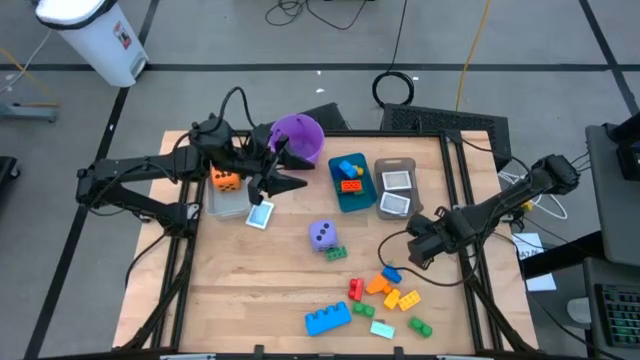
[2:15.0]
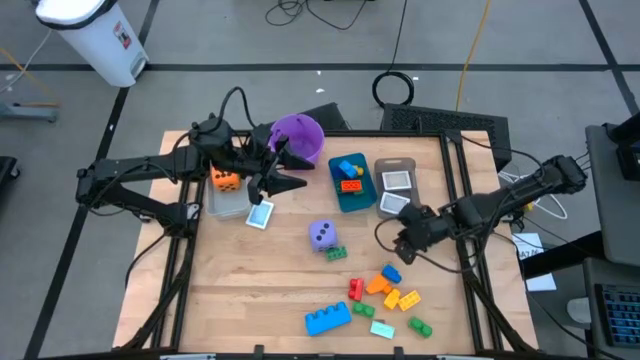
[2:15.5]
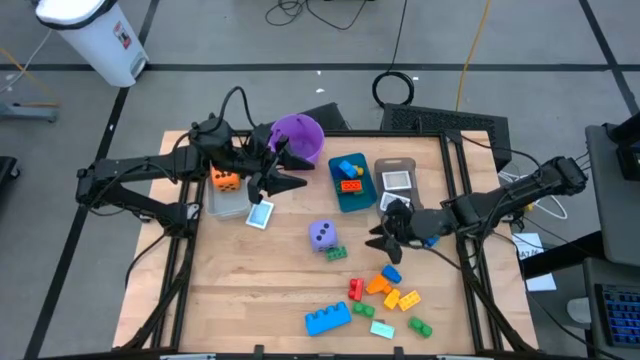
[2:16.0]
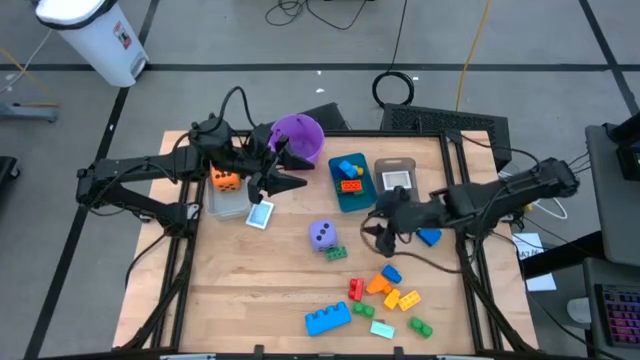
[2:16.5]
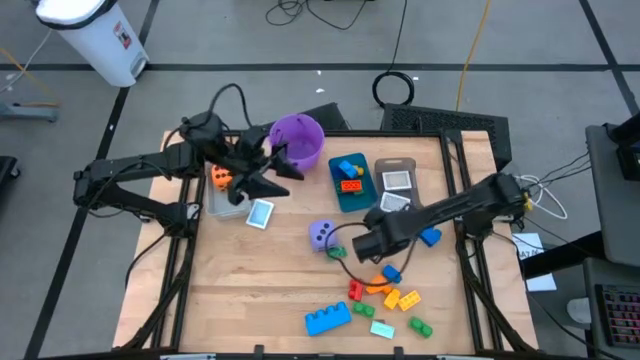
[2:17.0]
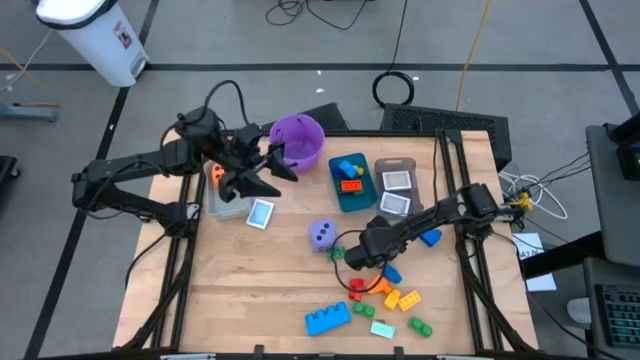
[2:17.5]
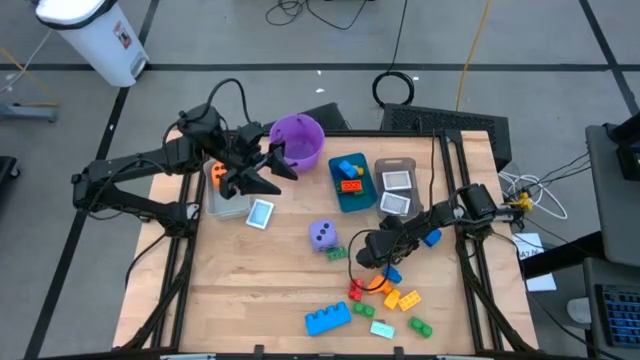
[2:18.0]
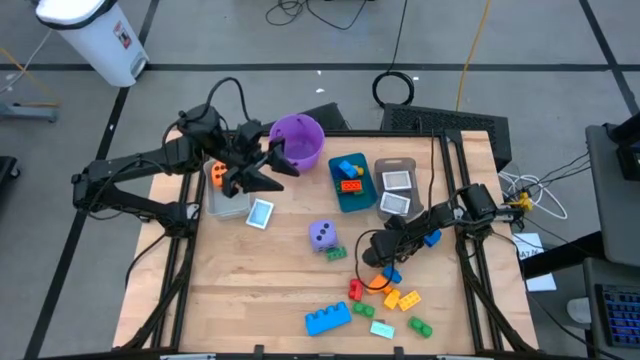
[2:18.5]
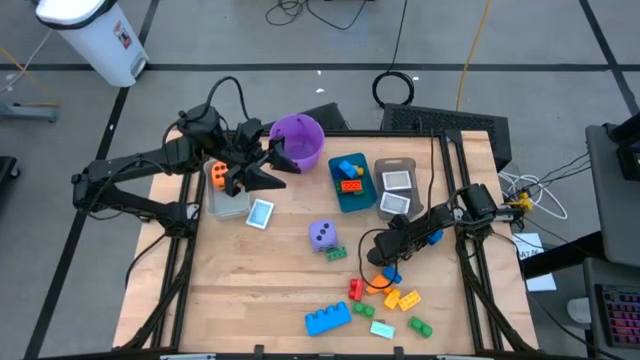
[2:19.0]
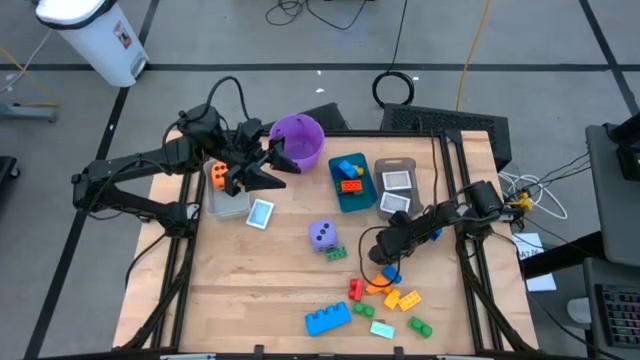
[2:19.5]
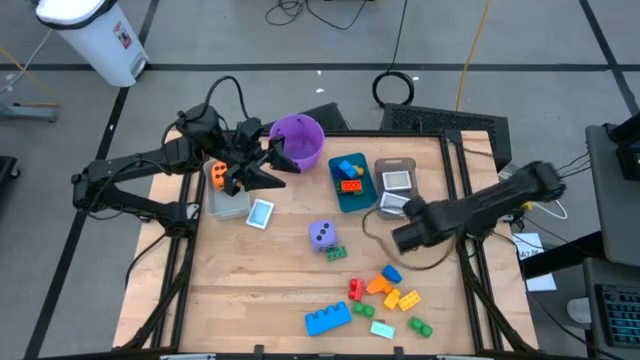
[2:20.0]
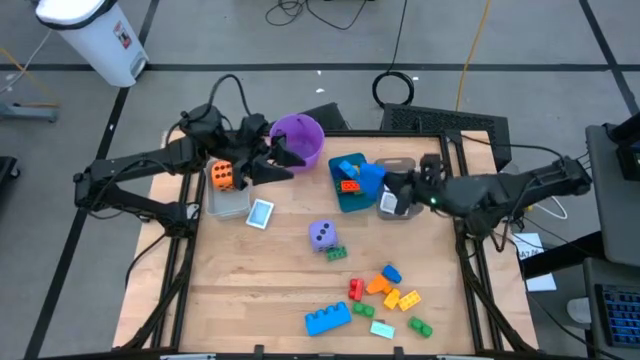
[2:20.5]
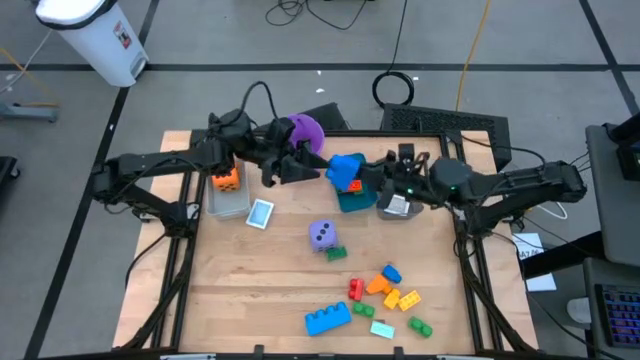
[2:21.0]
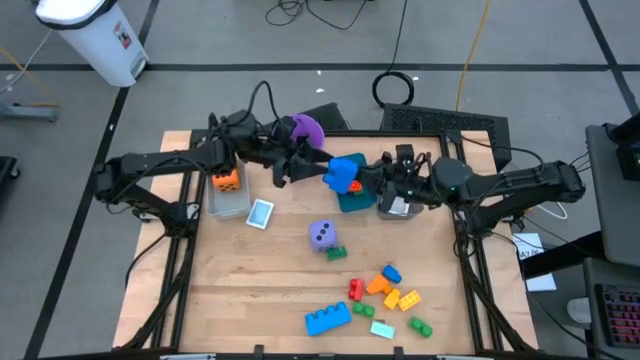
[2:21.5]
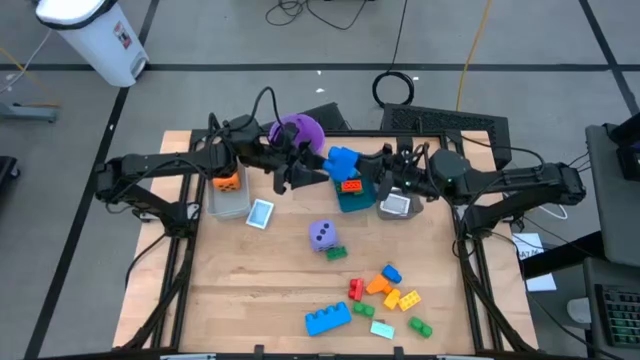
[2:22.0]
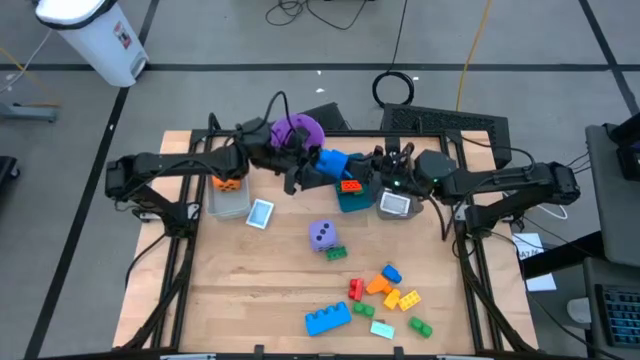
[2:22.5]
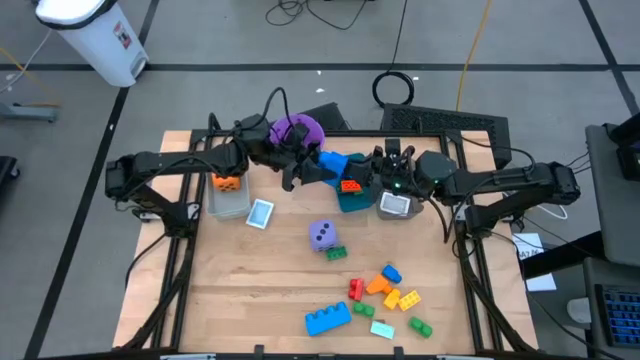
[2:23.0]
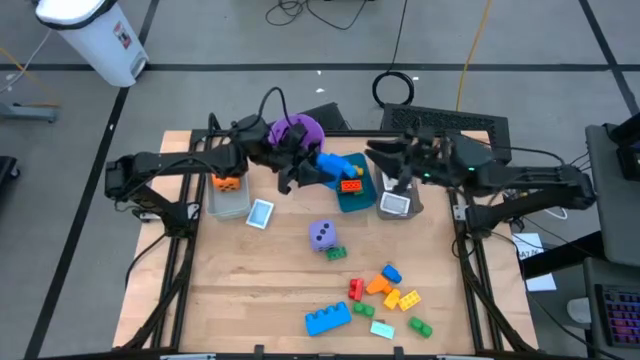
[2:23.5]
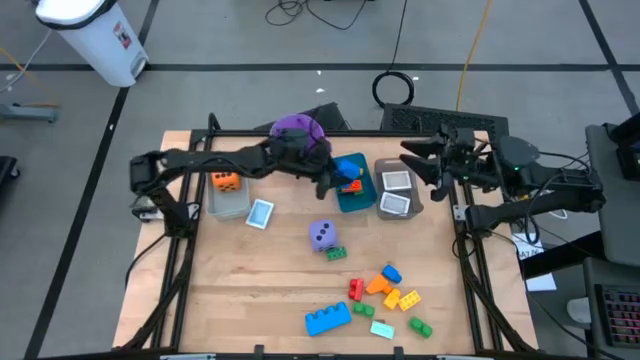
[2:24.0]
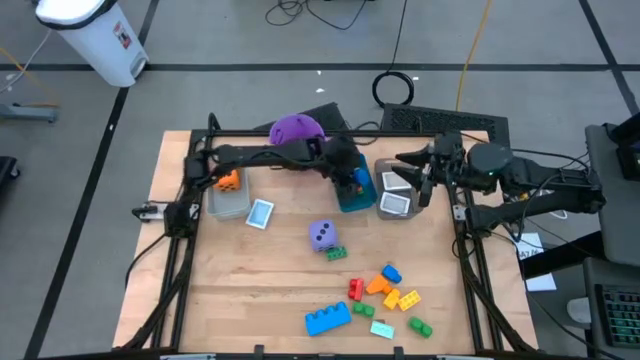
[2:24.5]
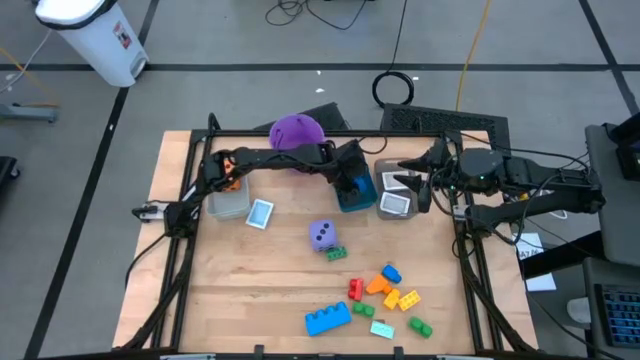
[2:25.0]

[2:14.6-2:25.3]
Task: Pick & Place Toys
Put the blue game piece into the blue bin

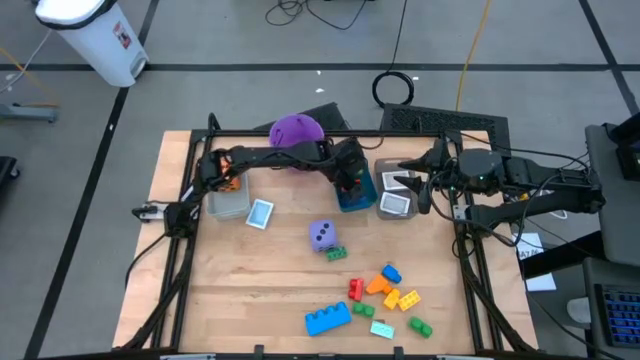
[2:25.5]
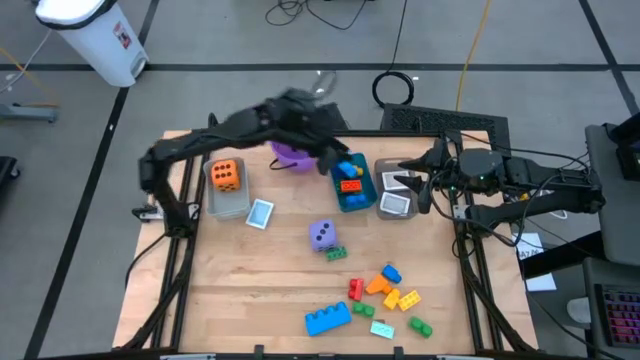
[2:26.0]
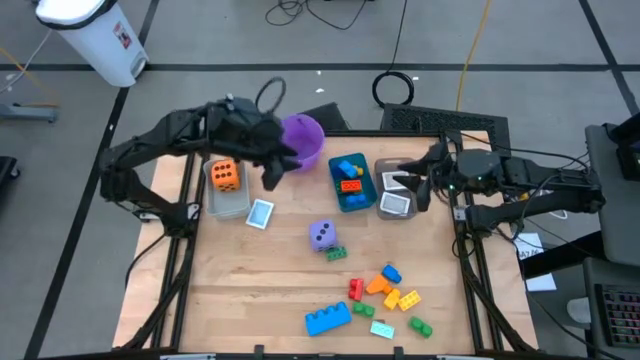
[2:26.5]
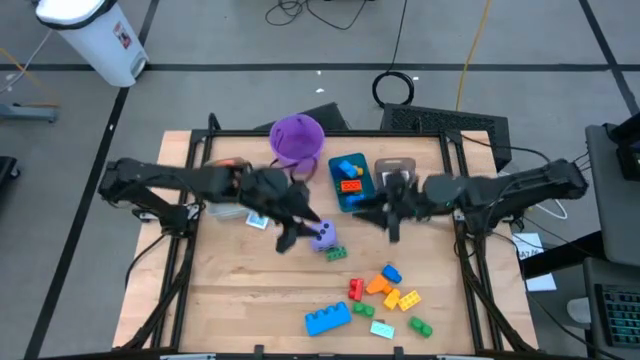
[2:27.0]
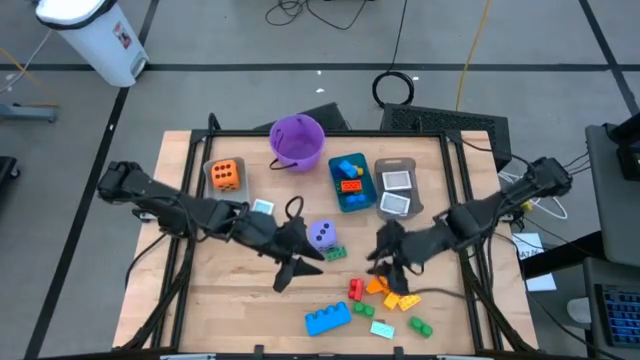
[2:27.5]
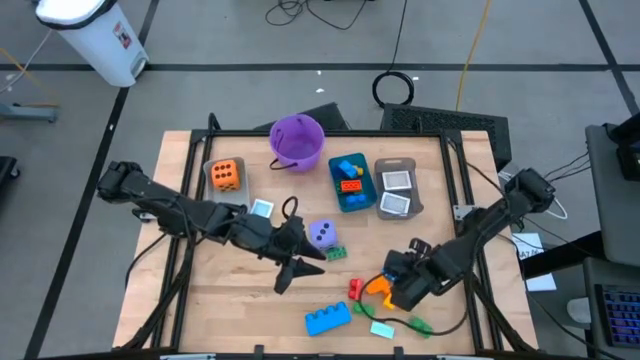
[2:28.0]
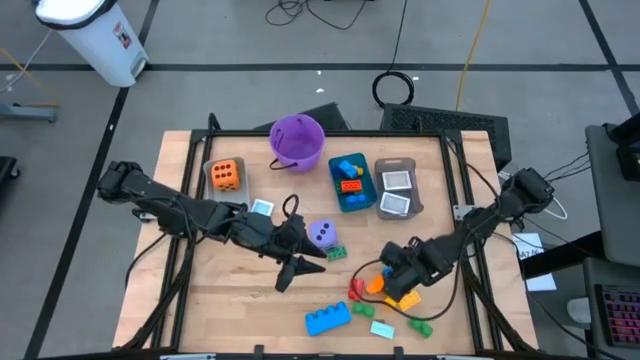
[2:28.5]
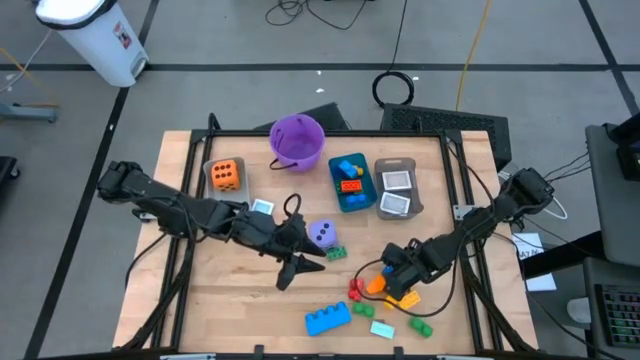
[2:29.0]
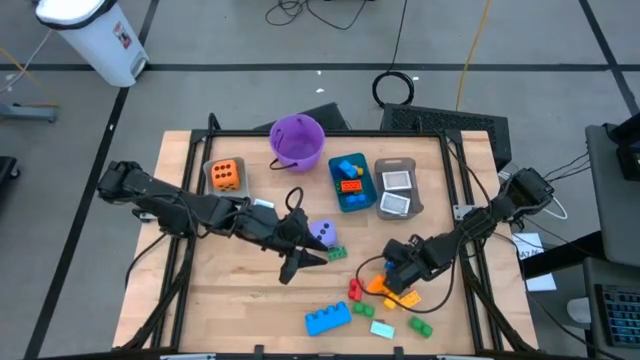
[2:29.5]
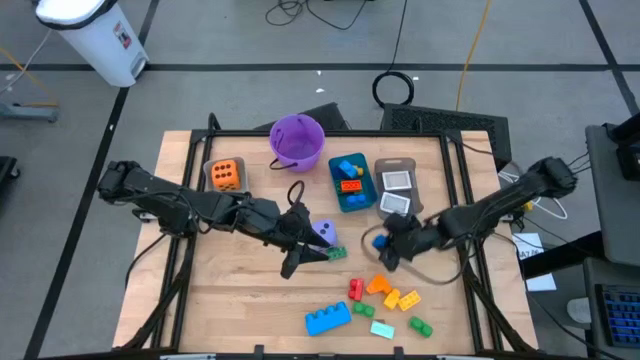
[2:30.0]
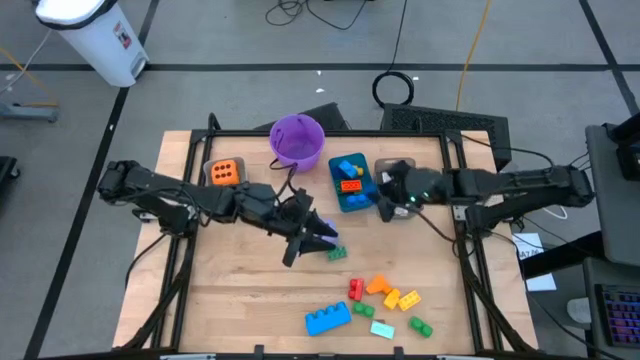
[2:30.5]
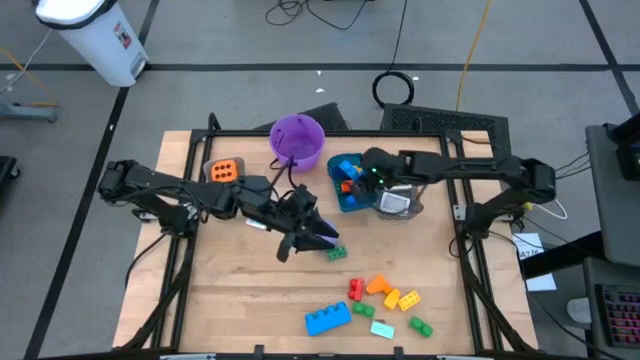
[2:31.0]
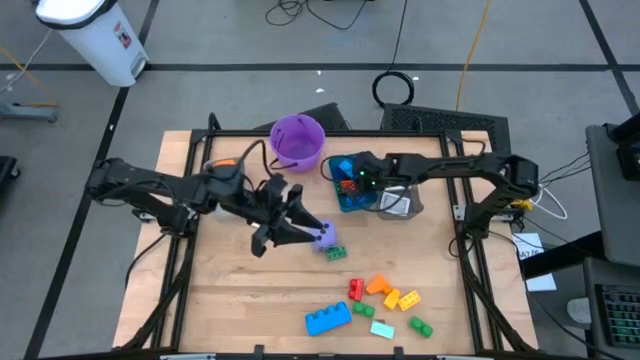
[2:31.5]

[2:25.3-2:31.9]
Put the dark blue game piece into the blue bin
